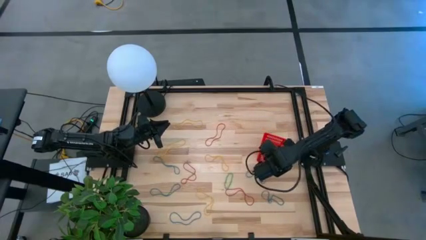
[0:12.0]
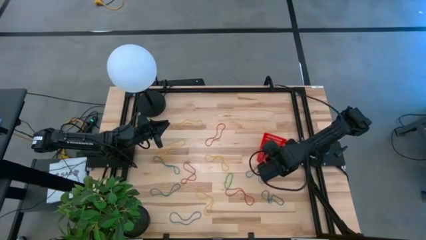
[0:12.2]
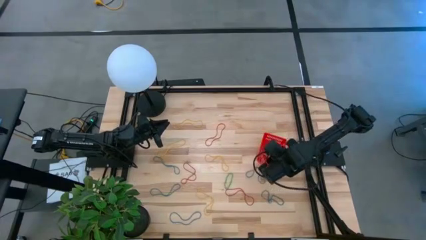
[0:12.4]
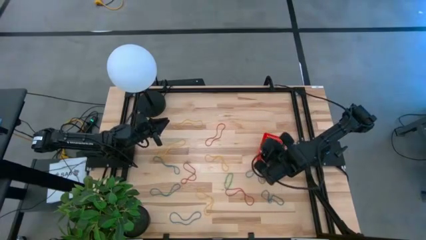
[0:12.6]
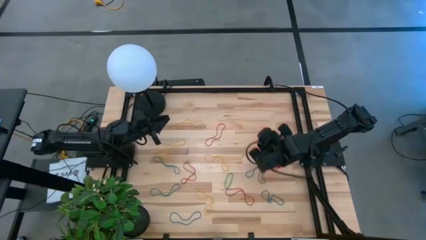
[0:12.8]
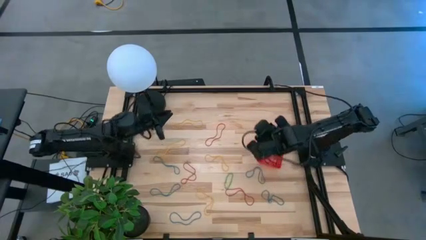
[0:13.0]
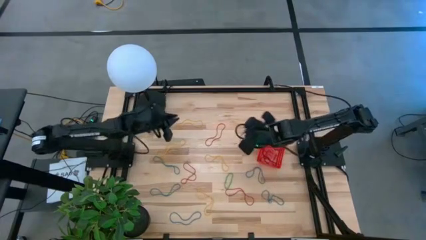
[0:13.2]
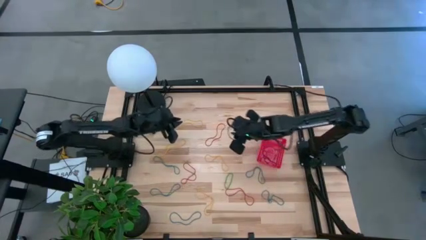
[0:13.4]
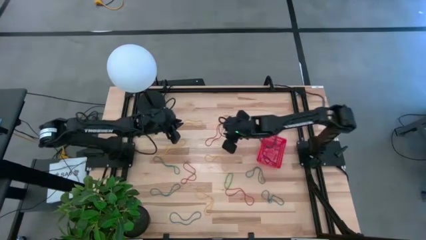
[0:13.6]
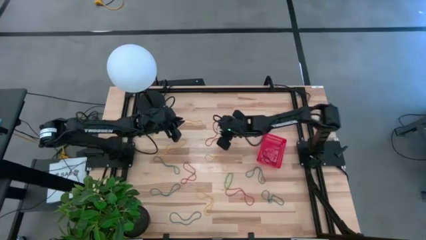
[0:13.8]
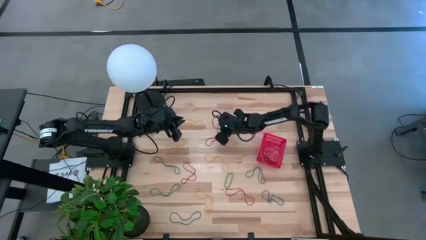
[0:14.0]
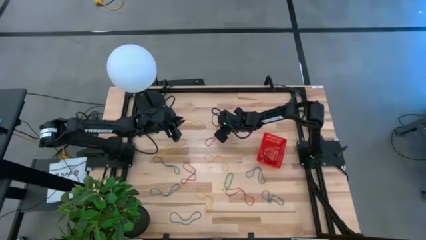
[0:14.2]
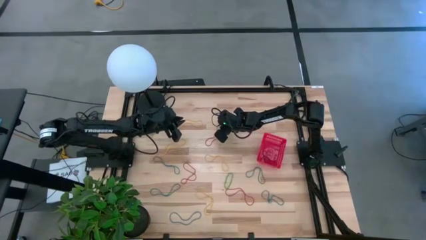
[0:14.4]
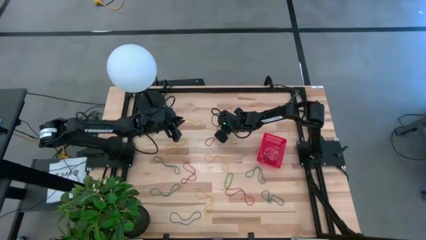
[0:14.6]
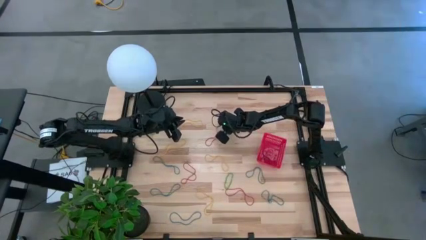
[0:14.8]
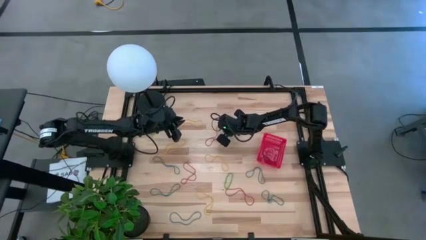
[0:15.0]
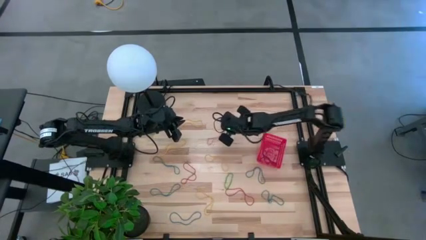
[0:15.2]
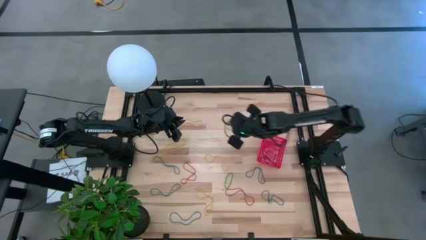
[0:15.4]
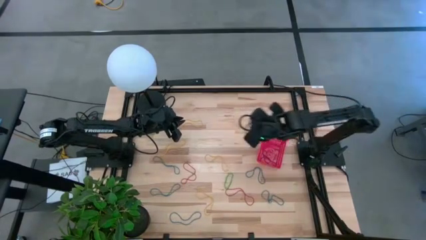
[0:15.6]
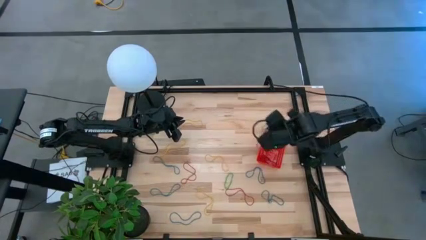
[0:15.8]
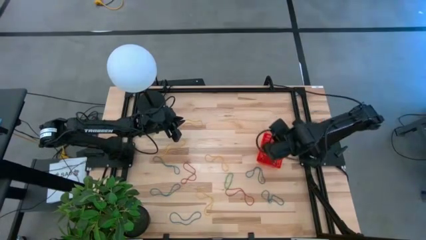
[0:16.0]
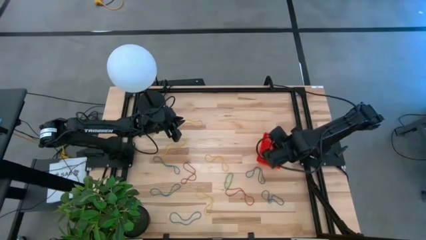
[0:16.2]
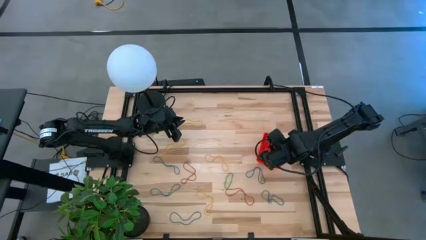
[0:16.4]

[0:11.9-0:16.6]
Task: Pick and place rubber bands into bin
Put the red rubber band into the basket

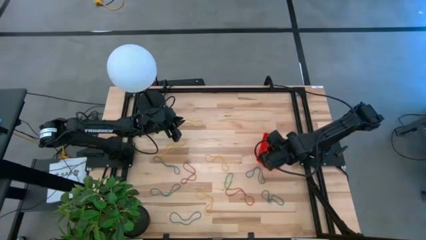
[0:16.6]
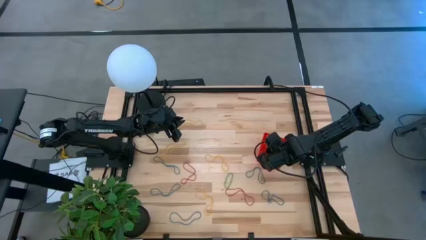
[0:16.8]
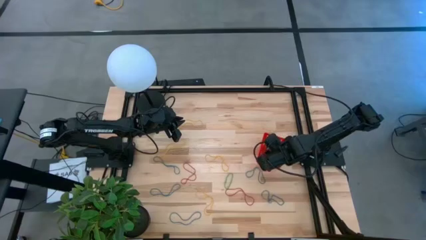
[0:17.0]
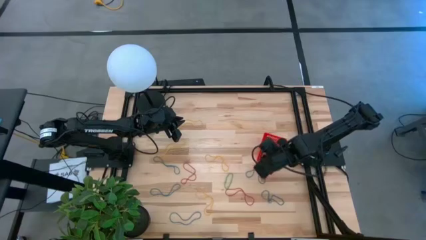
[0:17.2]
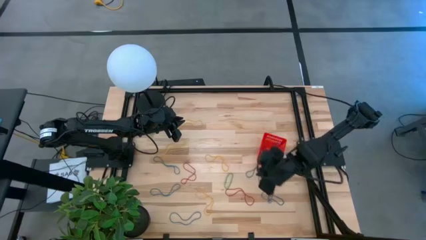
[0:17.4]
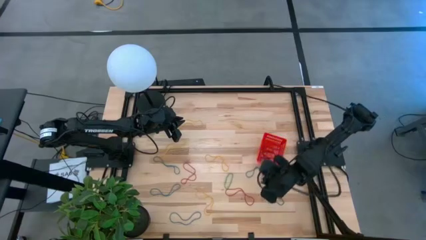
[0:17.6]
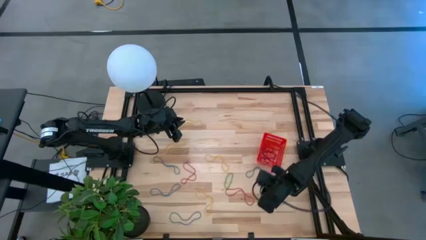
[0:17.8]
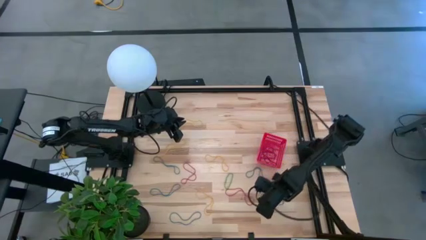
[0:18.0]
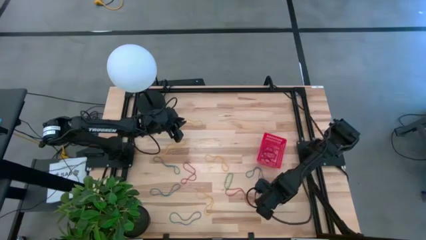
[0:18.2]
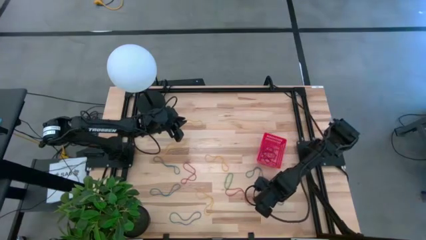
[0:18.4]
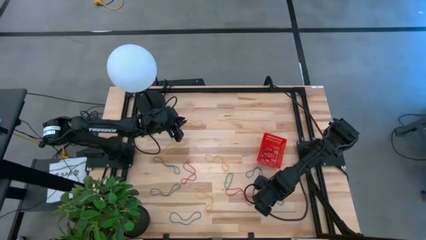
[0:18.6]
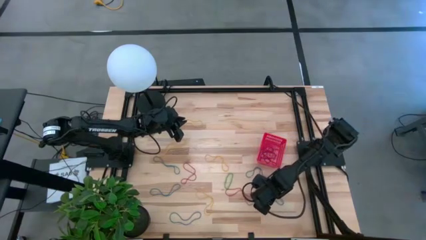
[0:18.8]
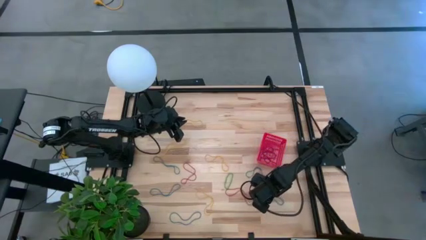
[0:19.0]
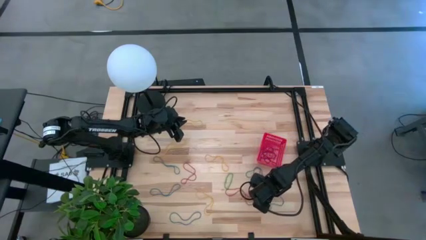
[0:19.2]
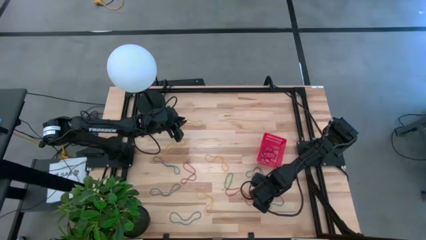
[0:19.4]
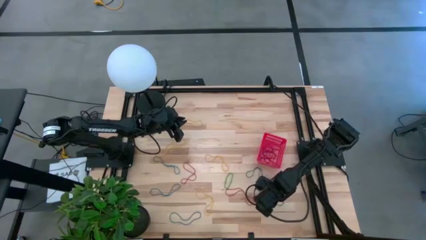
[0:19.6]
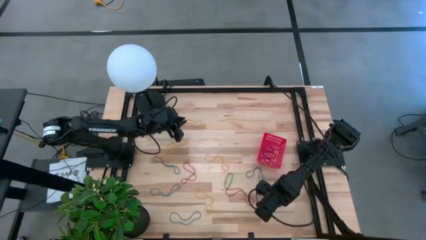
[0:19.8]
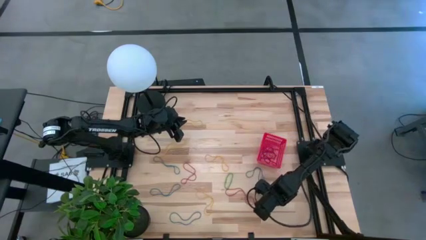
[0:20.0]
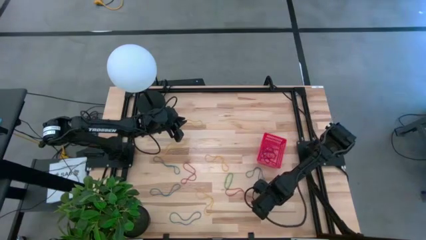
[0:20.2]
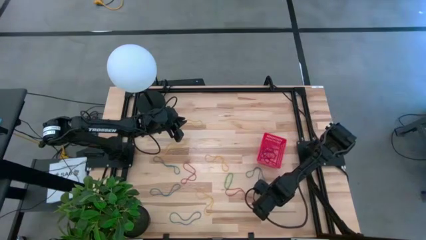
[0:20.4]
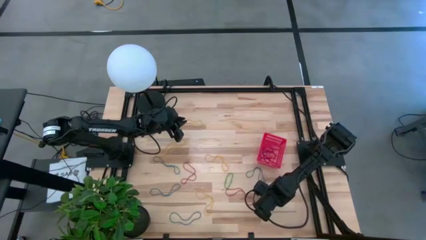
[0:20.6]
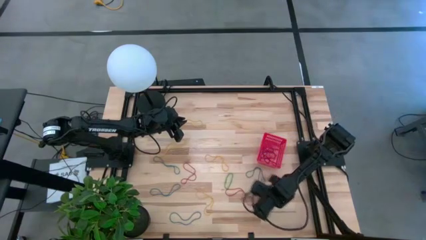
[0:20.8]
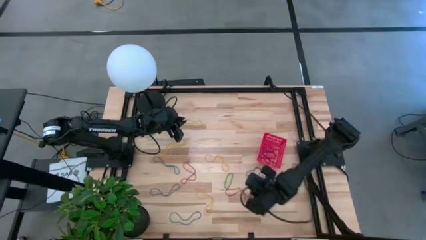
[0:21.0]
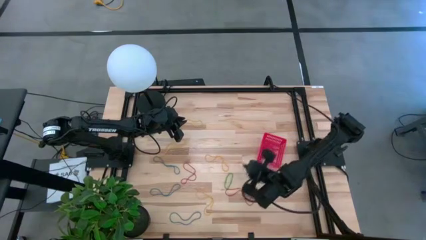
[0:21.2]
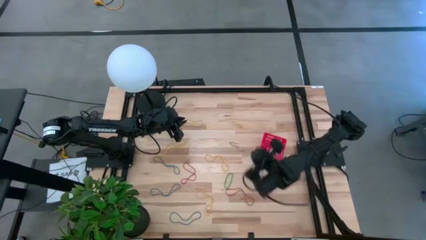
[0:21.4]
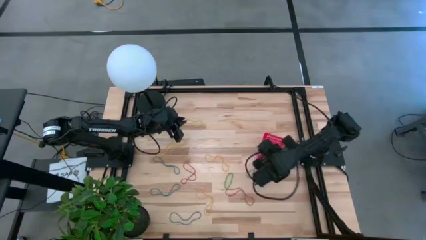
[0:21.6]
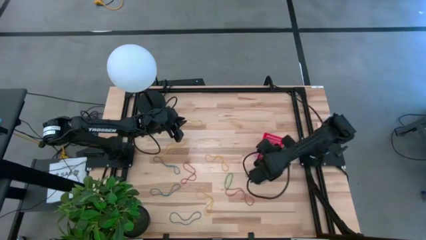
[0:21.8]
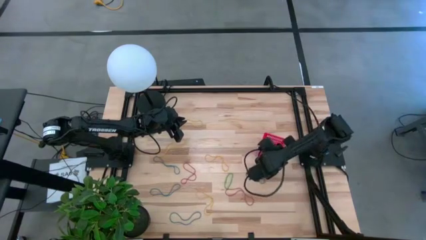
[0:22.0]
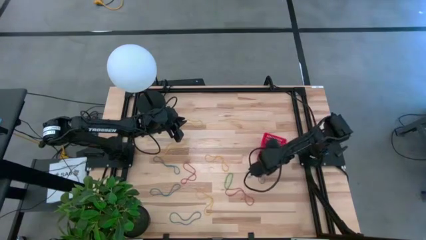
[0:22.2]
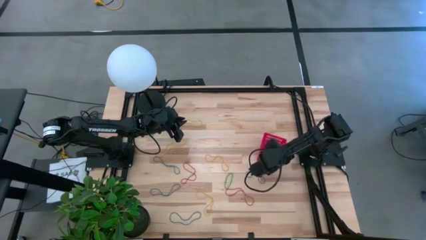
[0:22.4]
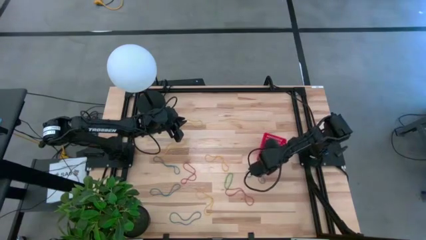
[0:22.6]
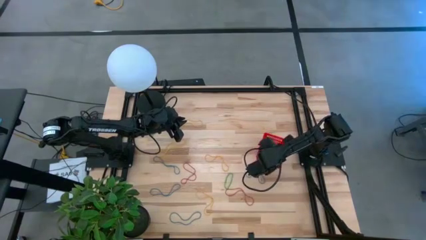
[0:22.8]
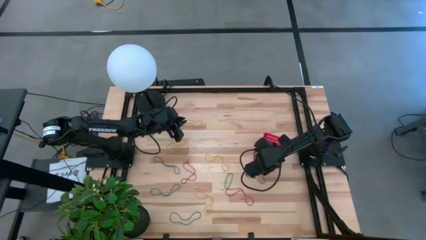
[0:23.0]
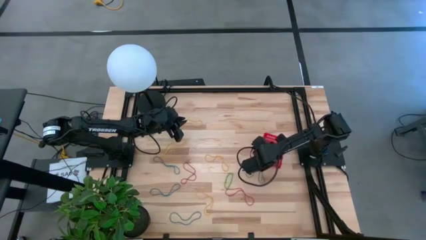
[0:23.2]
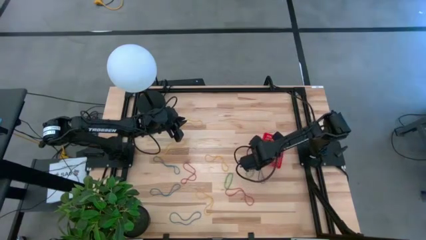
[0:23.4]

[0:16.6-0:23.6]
Put the blue rubber band into the basket

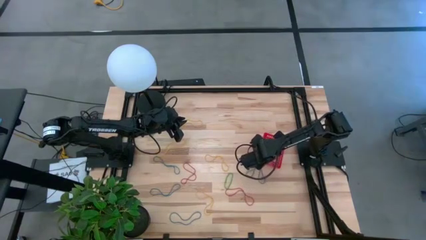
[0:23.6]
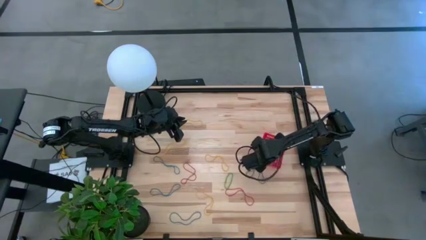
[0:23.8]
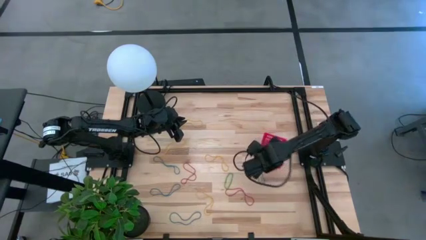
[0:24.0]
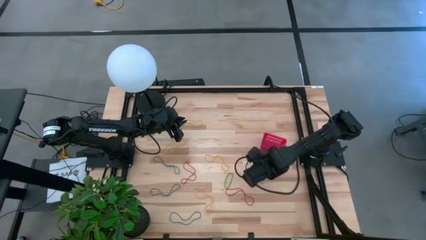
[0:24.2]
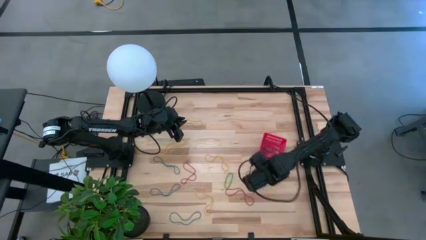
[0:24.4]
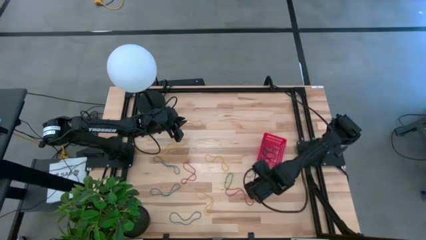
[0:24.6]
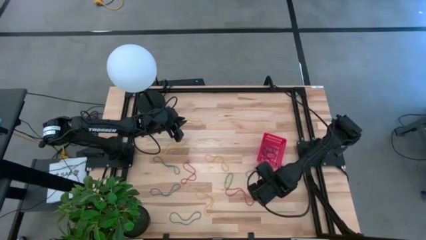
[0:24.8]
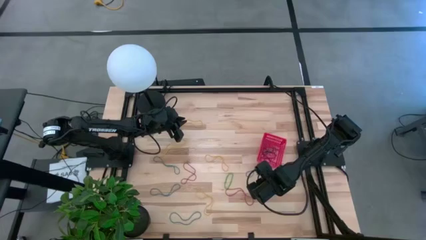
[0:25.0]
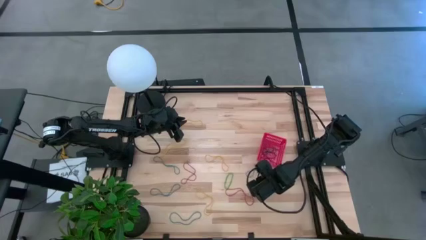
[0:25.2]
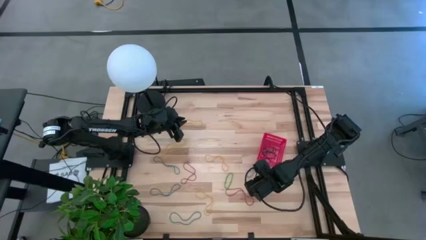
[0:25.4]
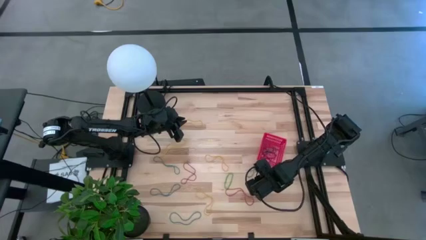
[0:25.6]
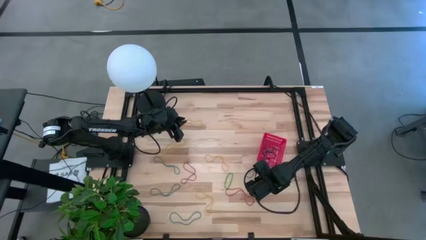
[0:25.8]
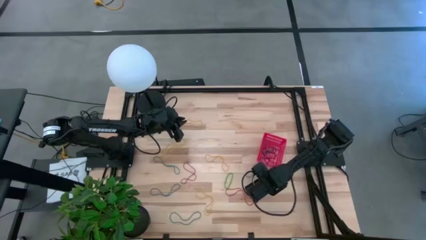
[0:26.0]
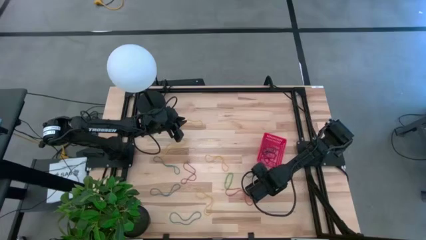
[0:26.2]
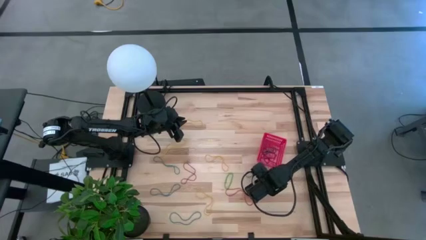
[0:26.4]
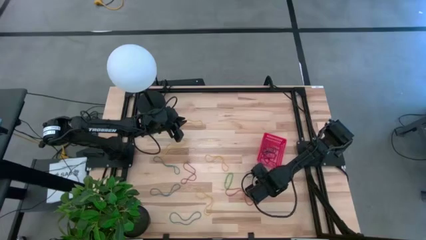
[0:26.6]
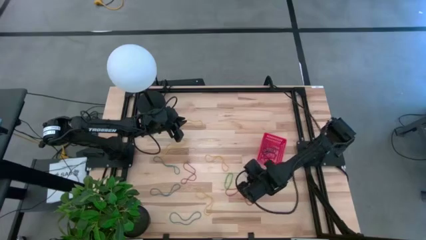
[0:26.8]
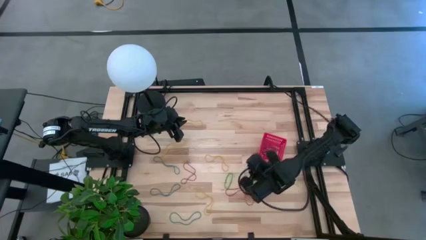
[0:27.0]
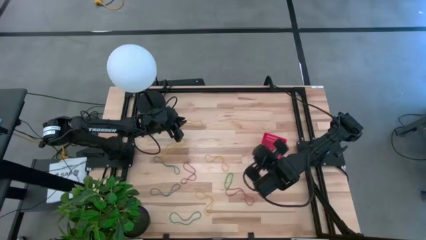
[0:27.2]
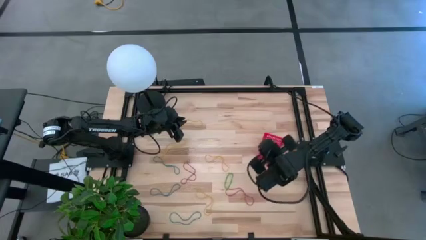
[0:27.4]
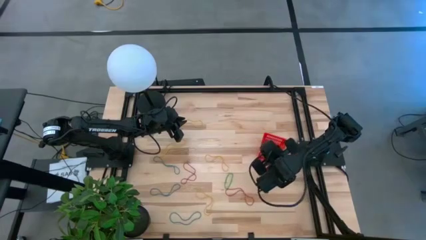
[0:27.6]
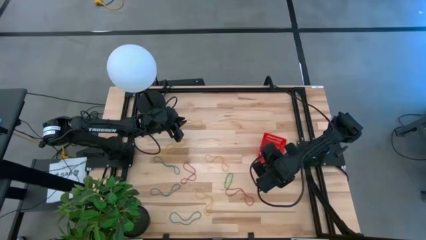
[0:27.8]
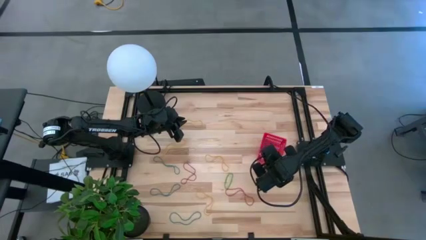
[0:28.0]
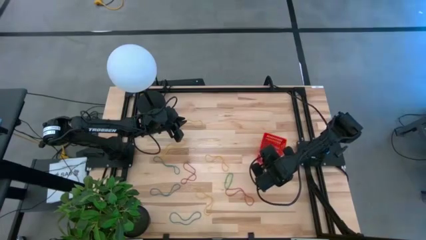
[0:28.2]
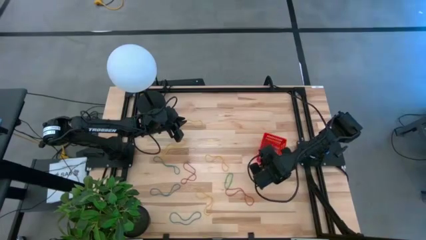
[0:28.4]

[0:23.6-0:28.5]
Put the blue rubber band into the basket
